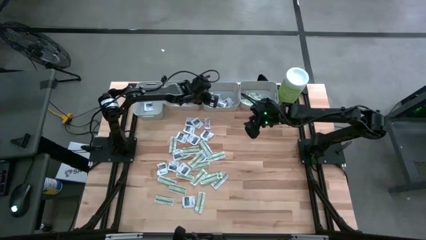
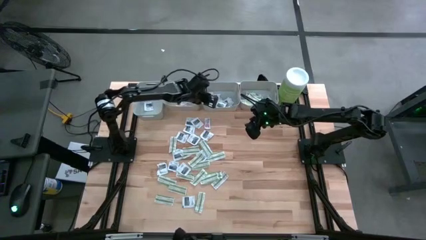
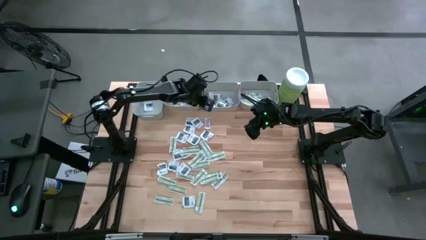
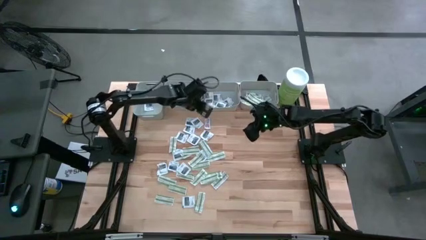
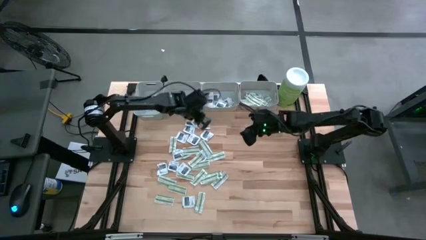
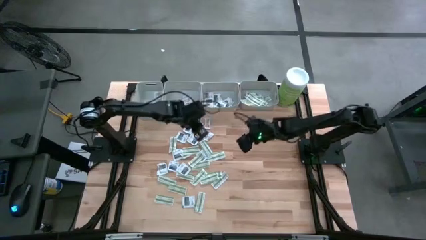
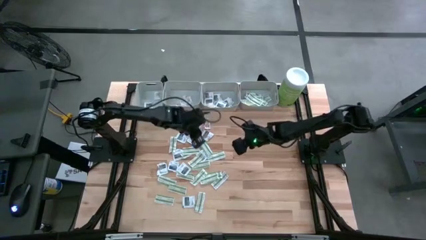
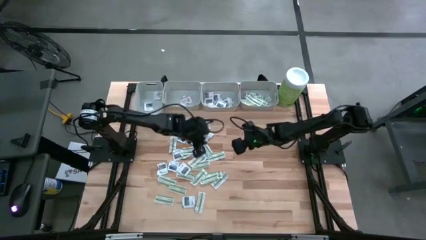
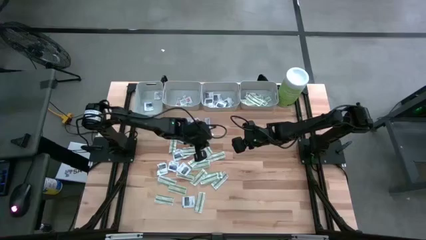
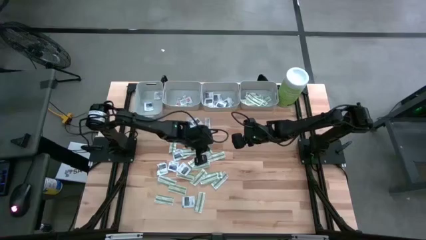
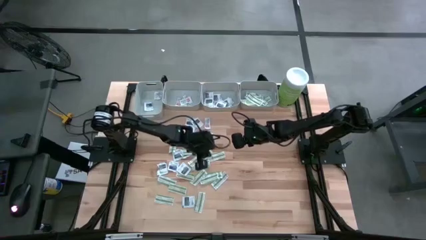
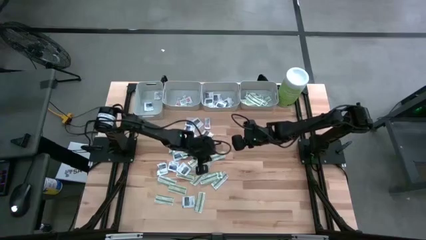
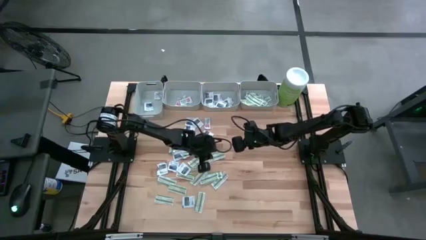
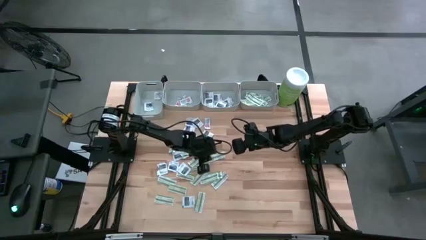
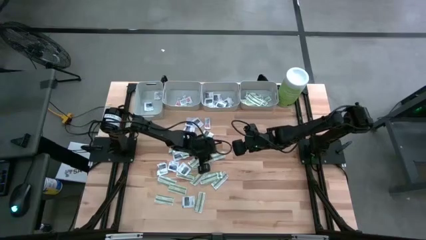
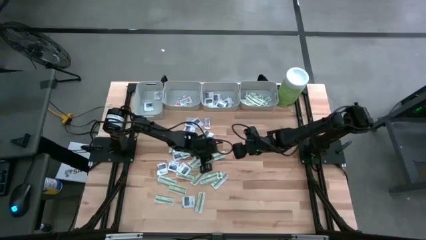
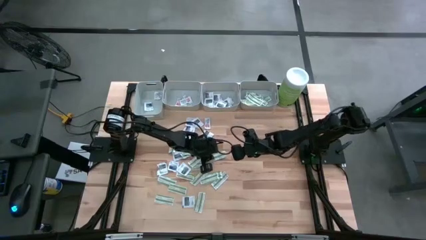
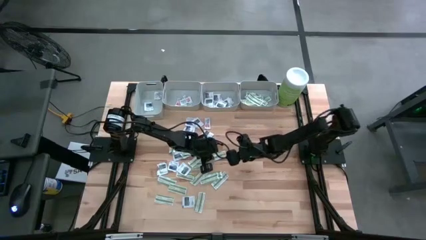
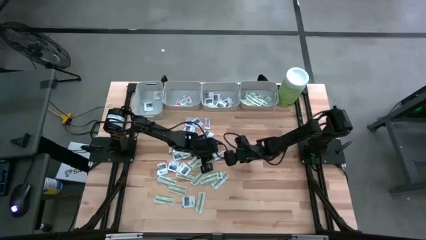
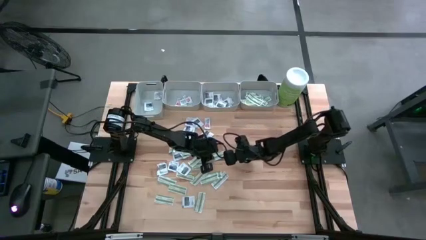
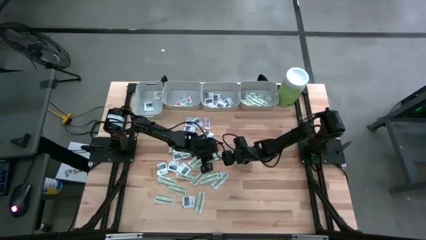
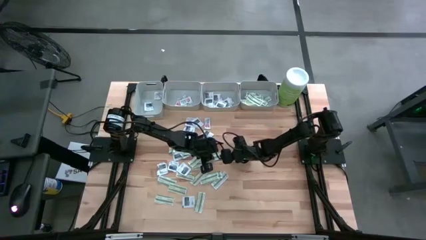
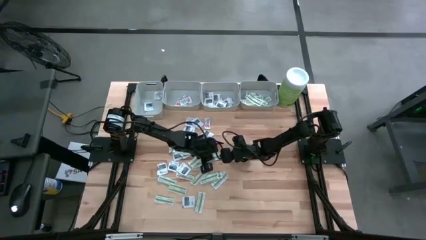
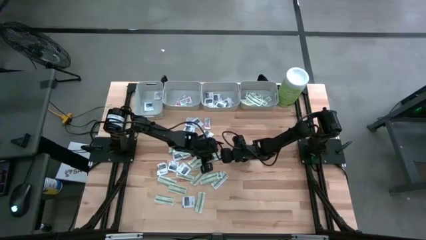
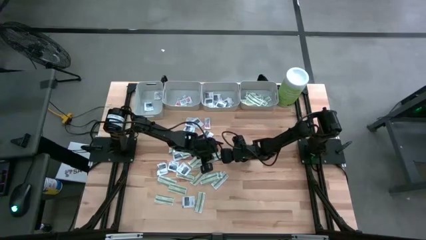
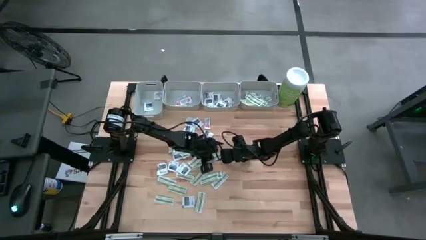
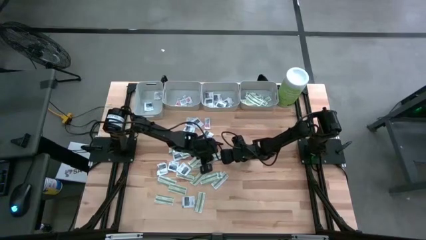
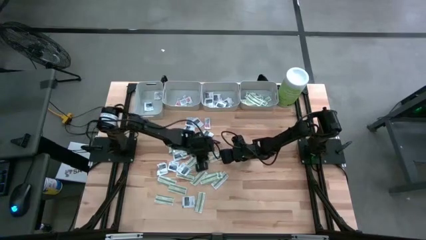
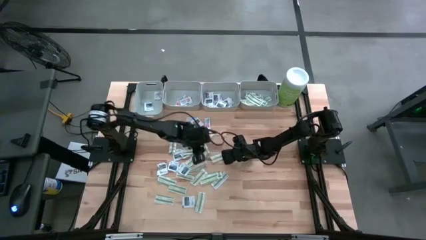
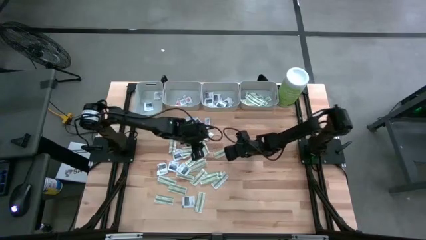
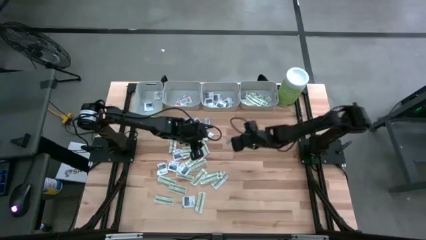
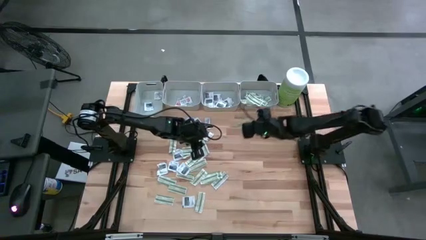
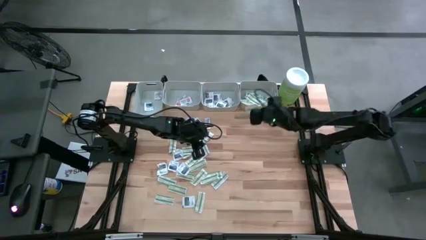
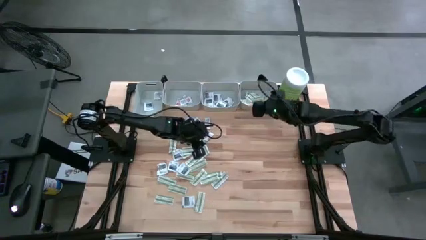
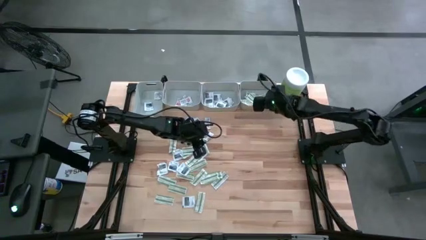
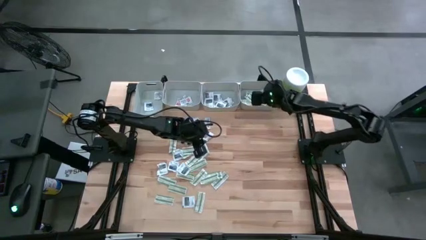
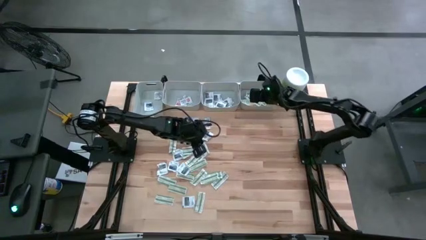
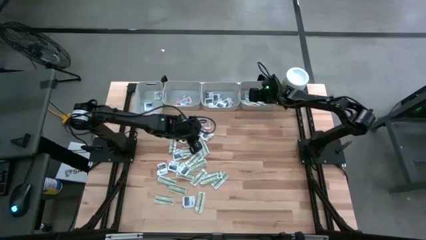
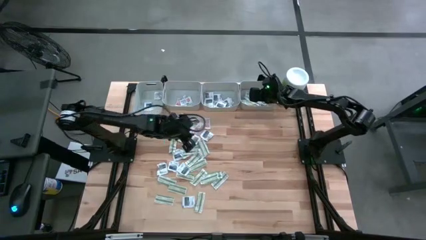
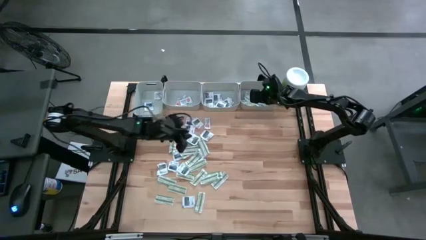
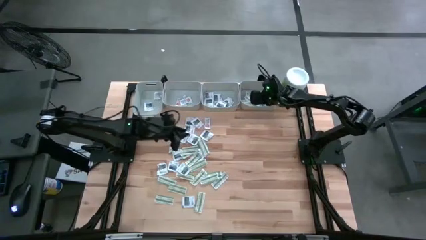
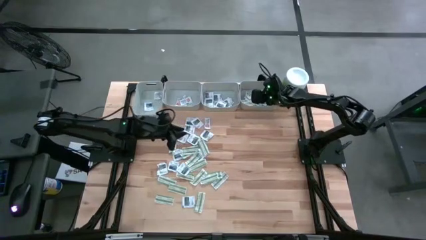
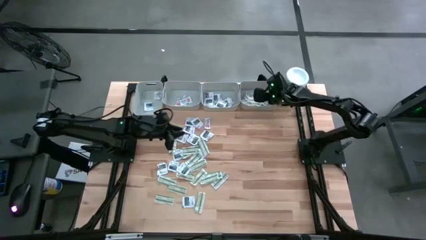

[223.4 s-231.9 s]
Task: Pick & Place First Aid Supplies
Put the green bandage into the right gray bin

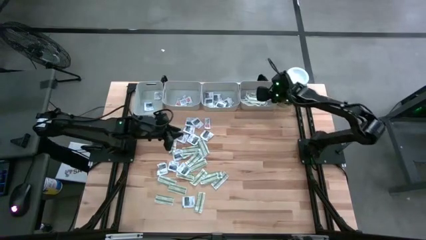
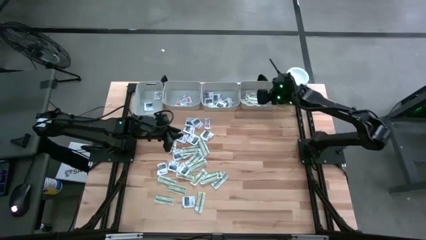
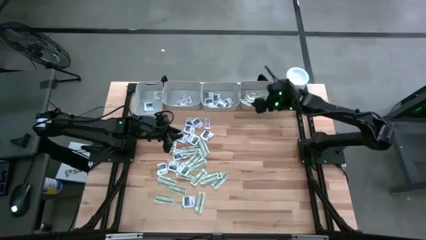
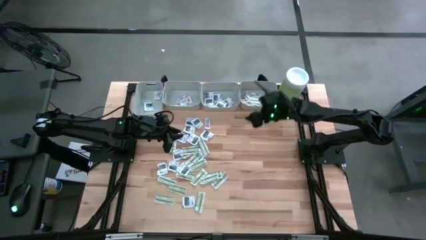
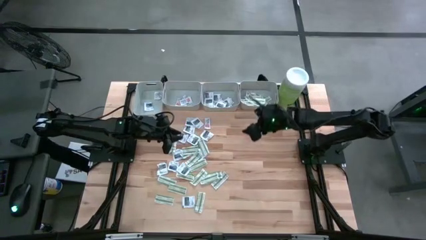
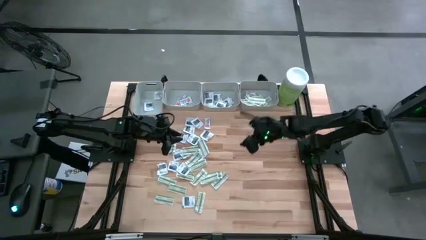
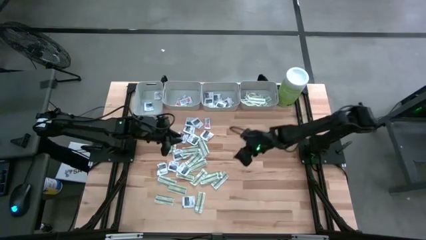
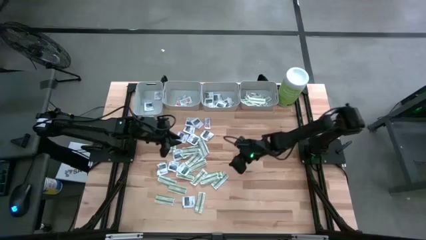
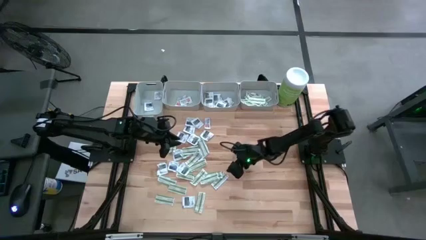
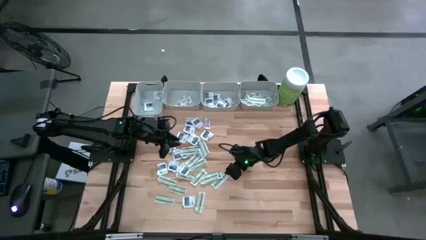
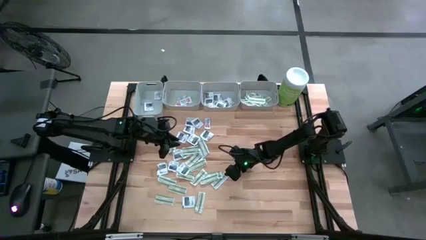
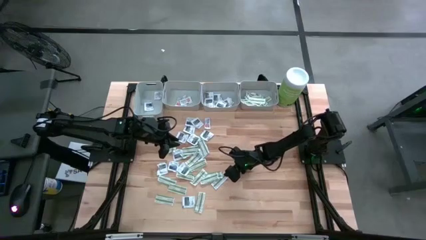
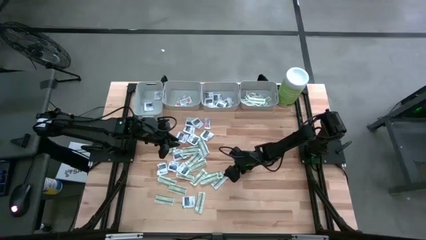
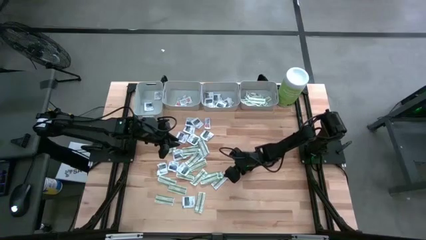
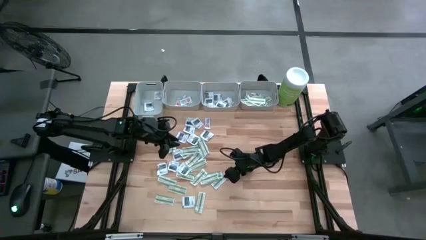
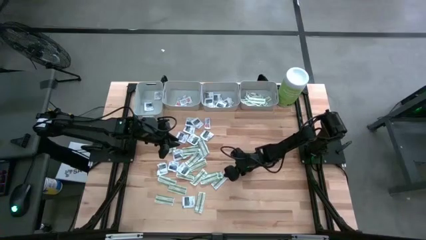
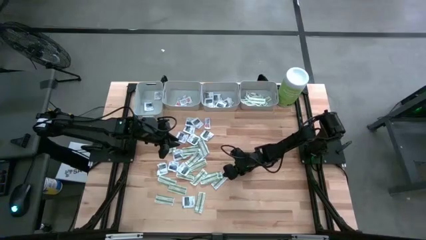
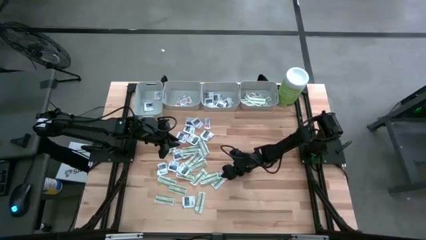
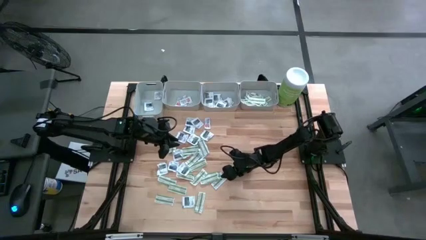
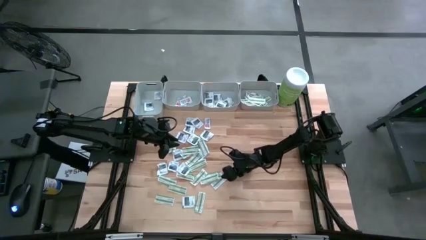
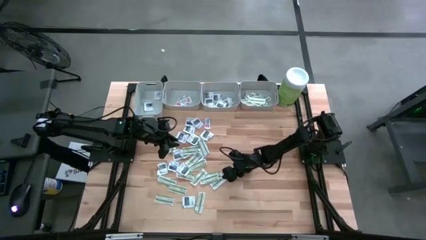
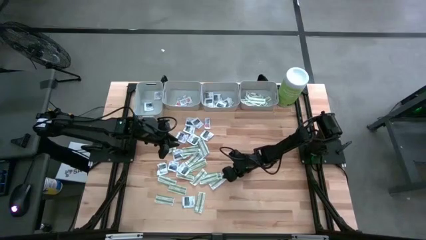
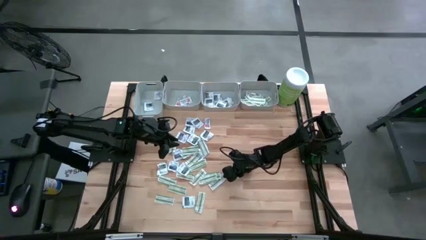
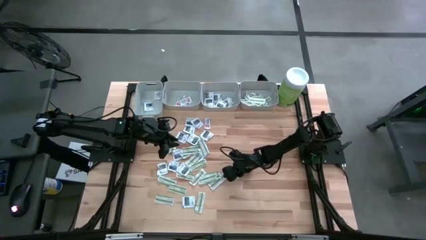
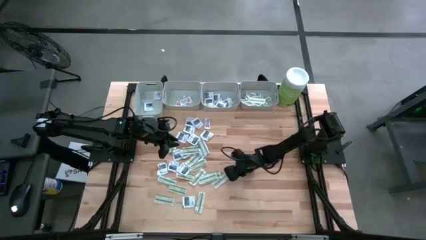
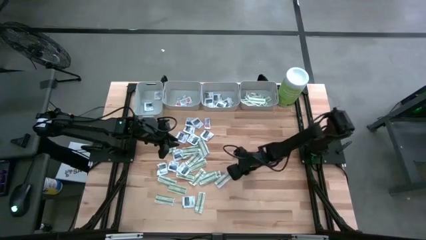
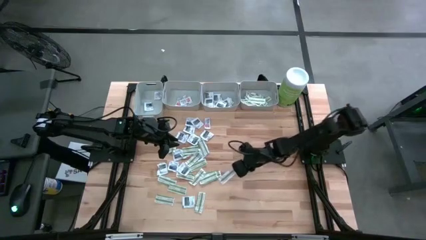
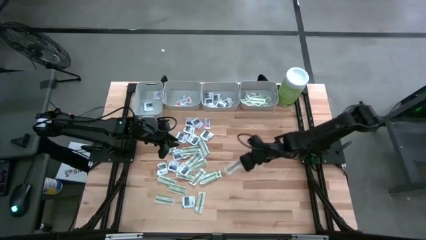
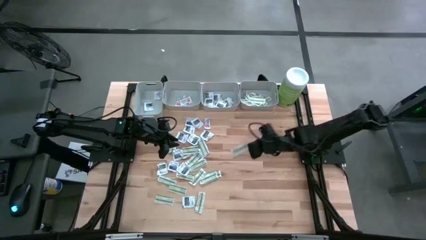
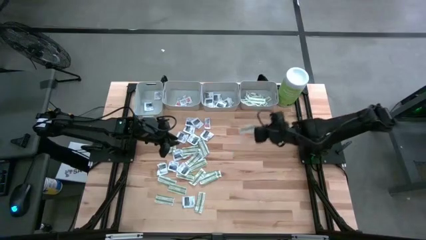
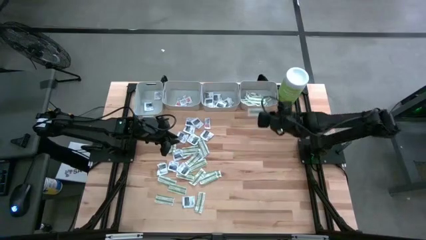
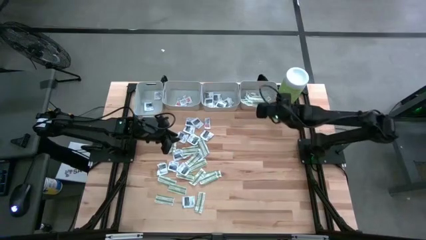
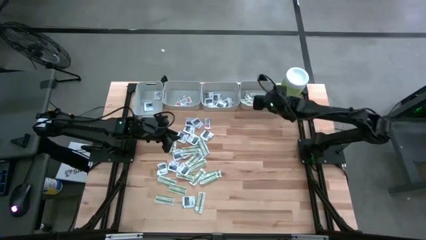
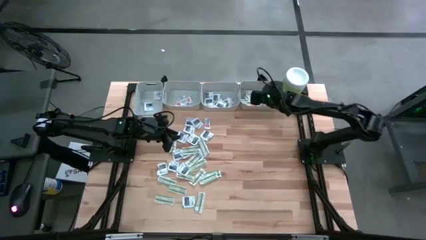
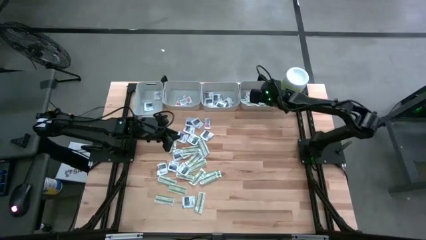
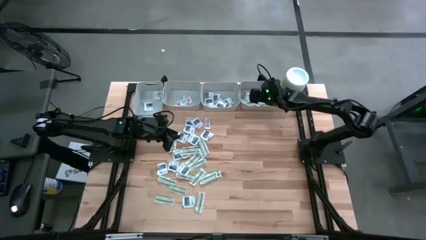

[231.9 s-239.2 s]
Put the green bandage into the right gray bin
